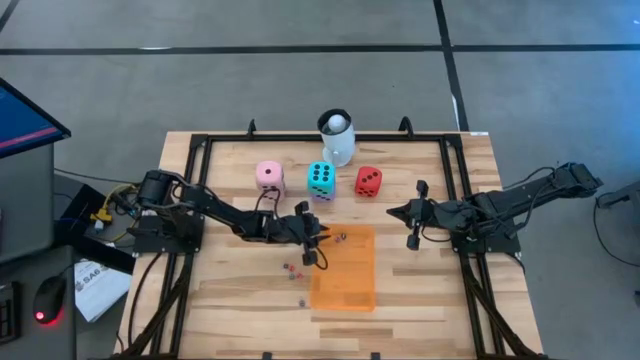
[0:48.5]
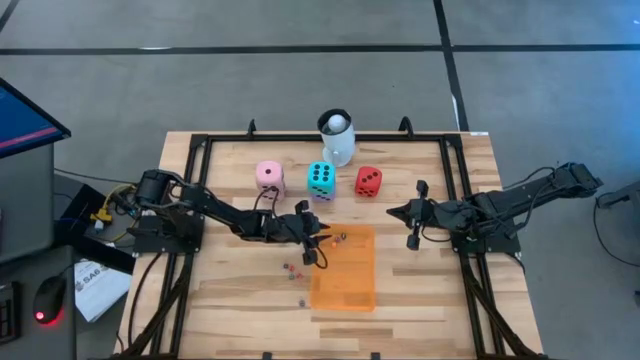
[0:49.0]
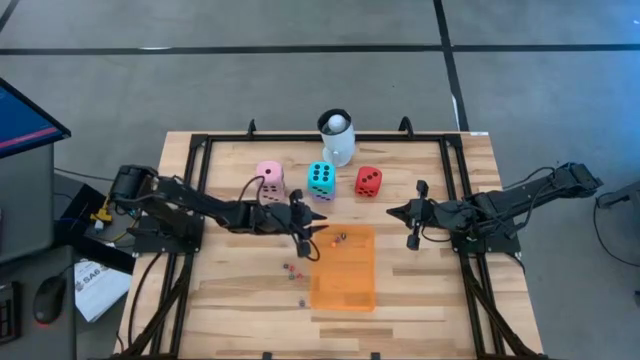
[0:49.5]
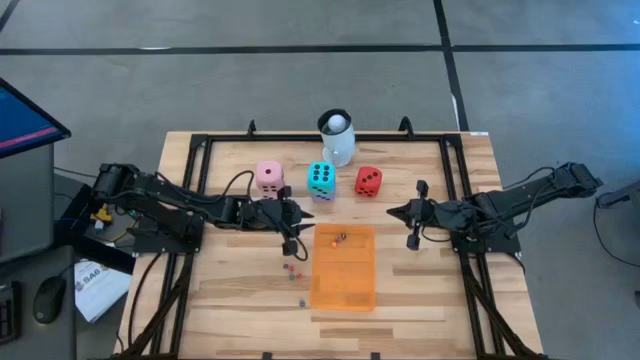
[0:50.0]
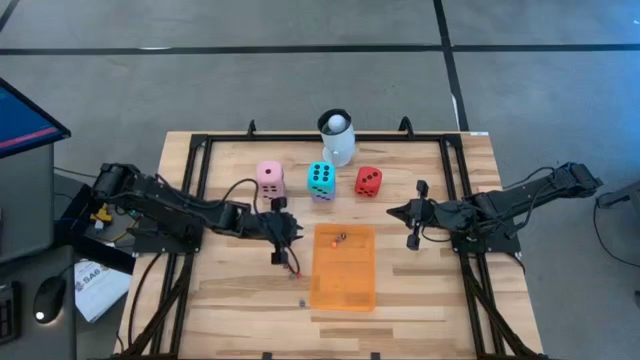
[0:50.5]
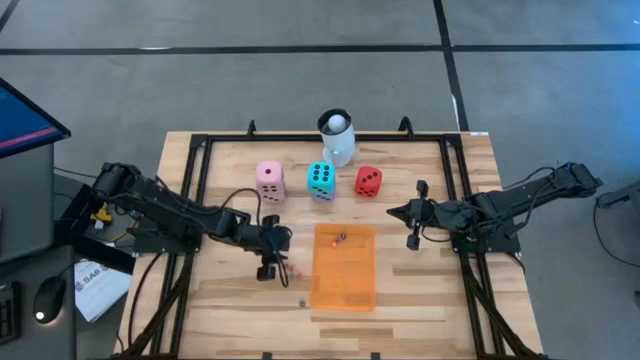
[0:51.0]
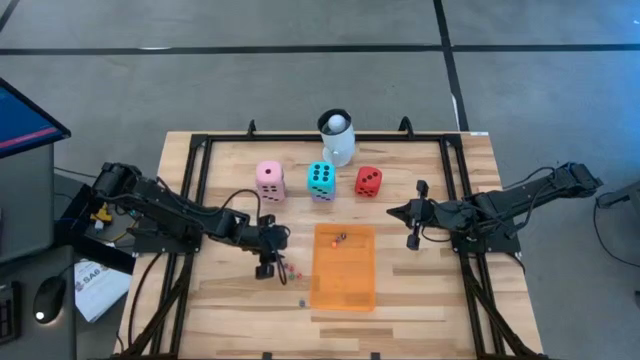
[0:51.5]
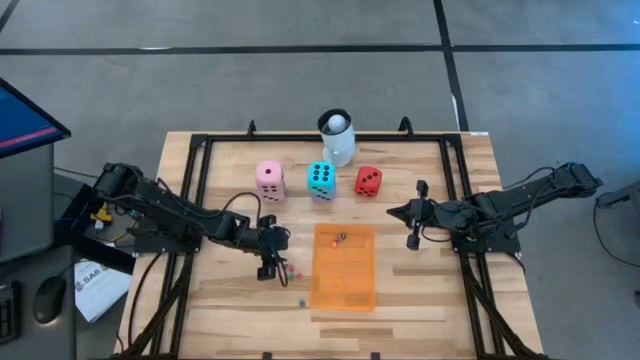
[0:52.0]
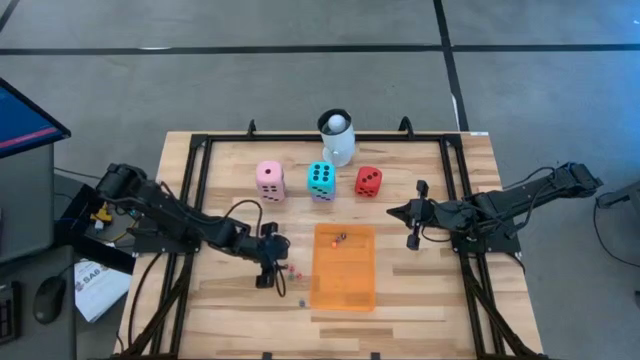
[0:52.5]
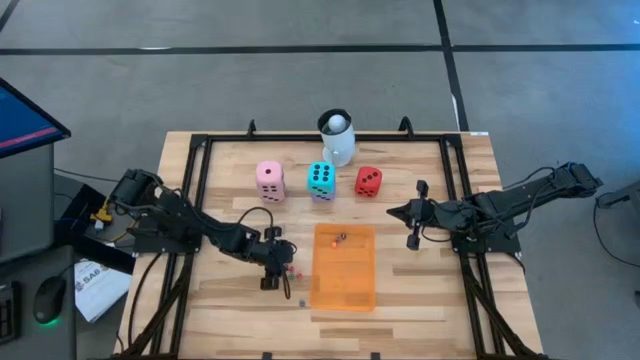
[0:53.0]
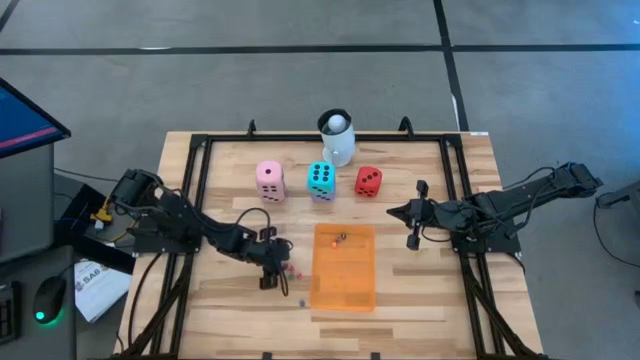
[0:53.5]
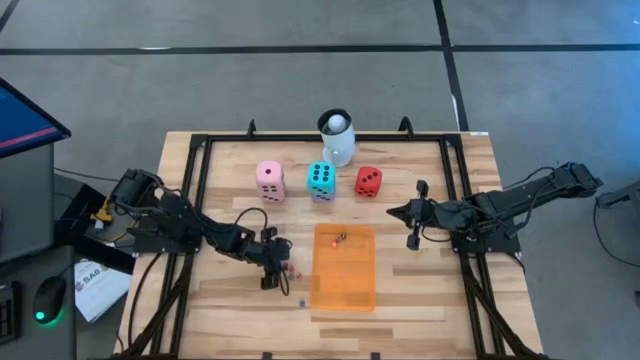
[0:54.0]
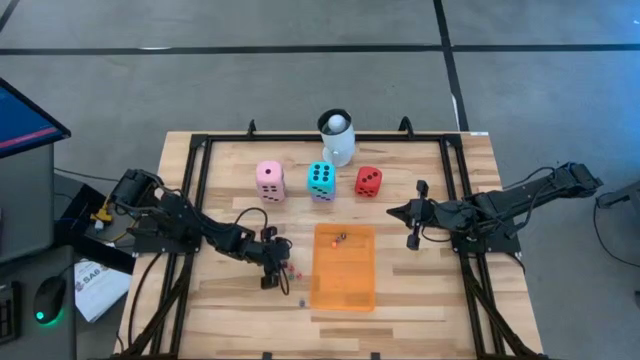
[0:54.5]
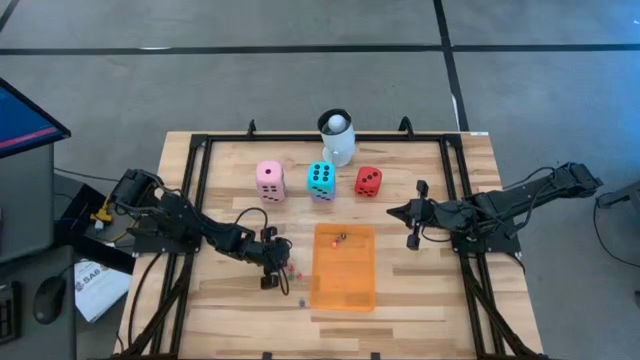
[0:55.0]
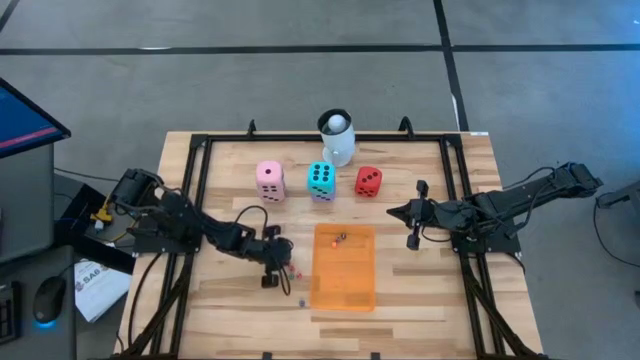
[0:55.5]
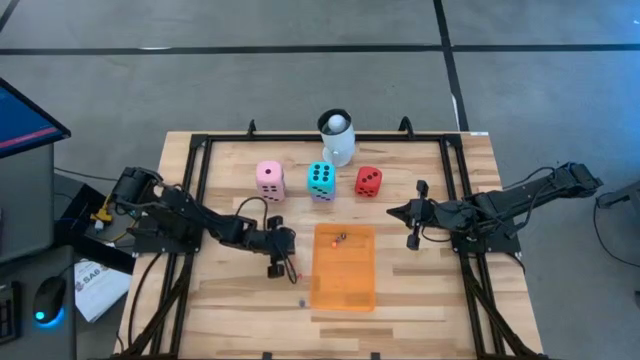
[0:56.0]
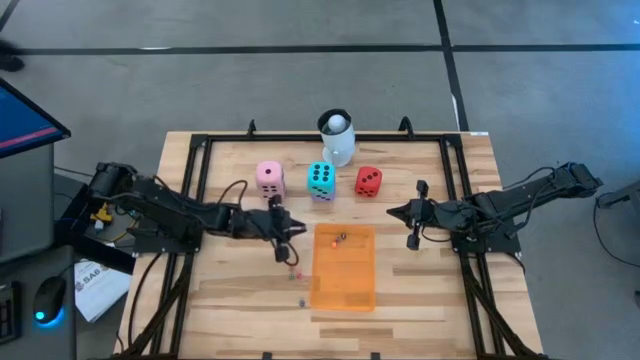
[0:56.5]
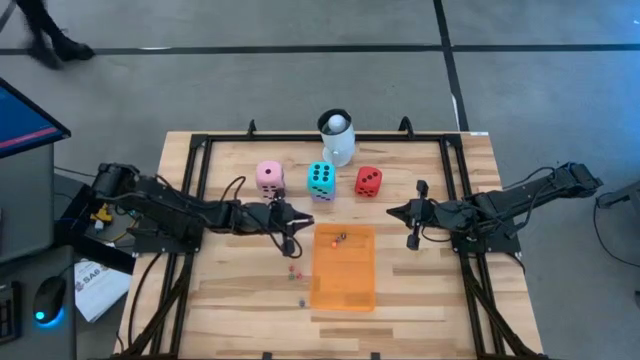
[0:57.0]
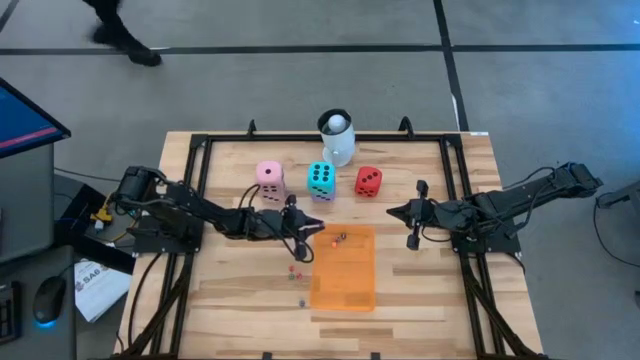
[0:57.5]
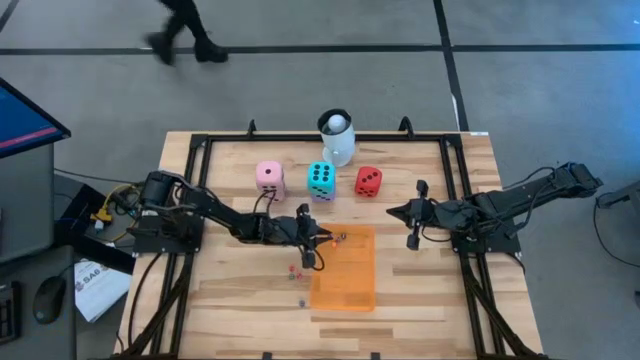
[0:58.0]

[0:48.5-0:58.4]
Task: Pick & Place Dice
Put the small purple dice into the orange bin

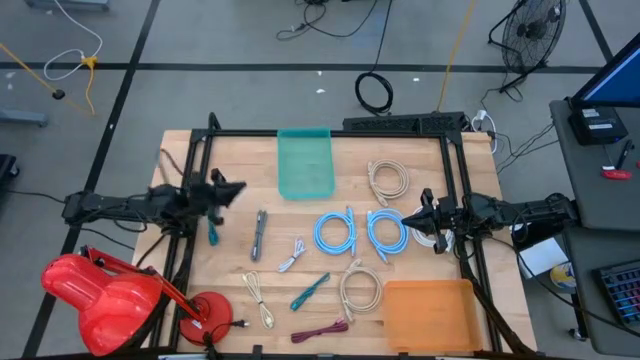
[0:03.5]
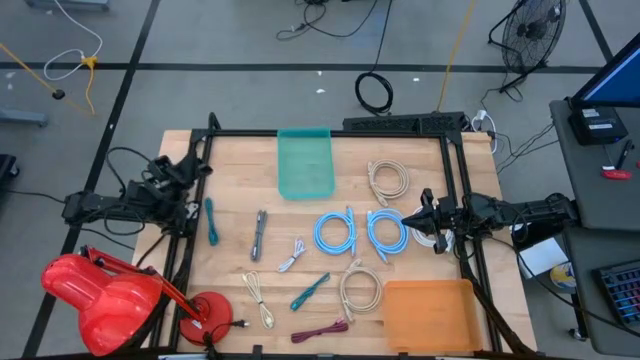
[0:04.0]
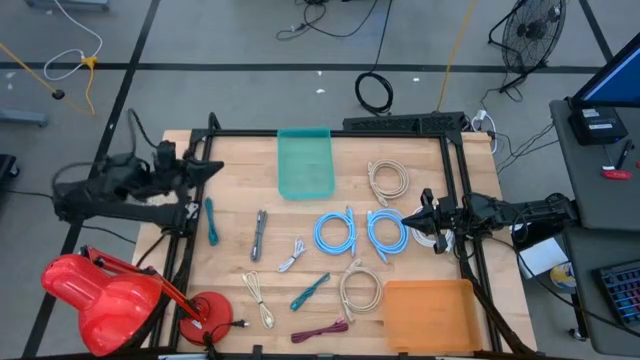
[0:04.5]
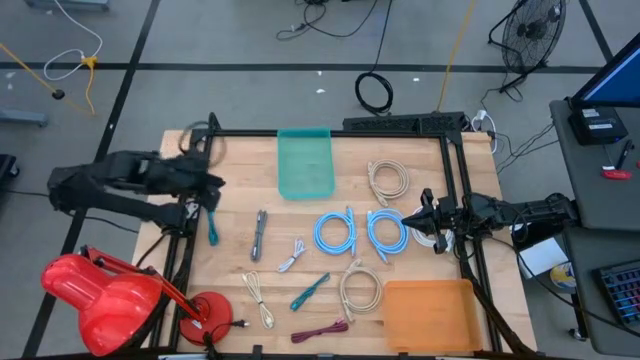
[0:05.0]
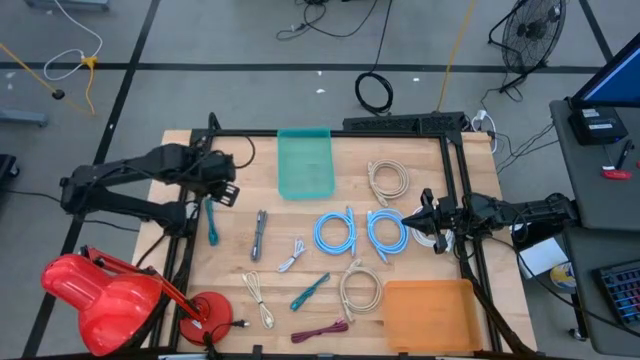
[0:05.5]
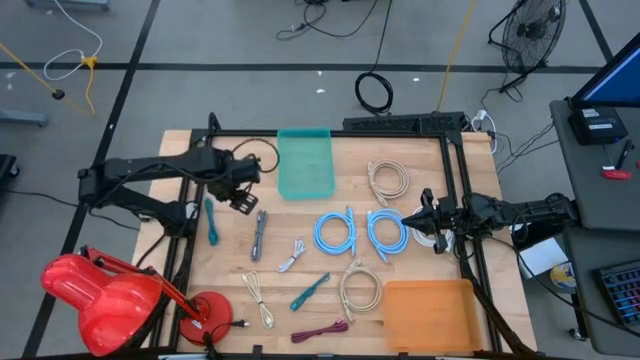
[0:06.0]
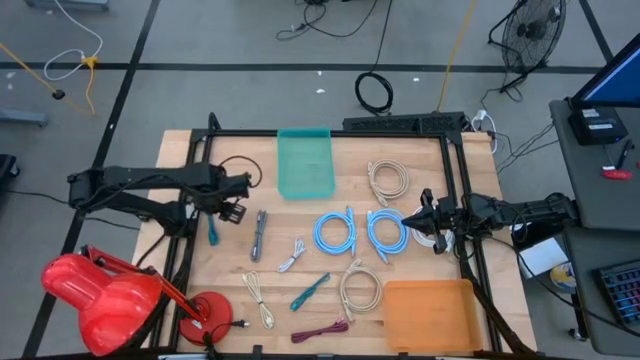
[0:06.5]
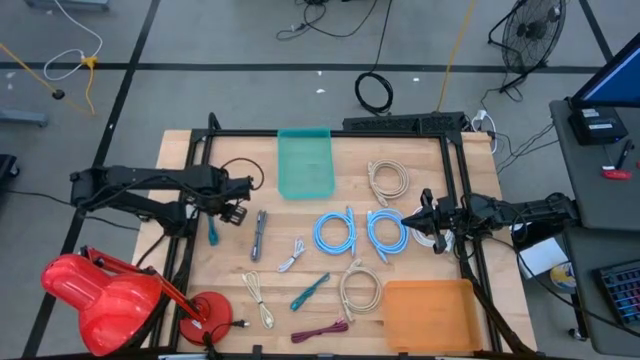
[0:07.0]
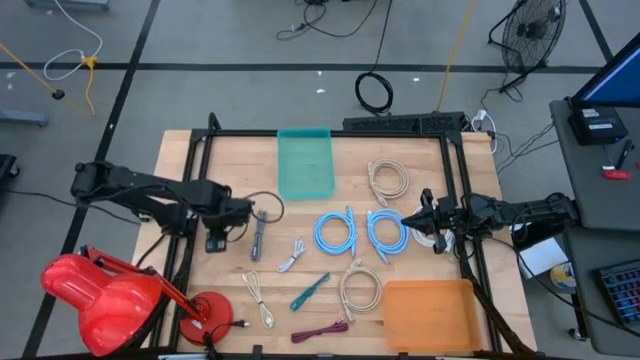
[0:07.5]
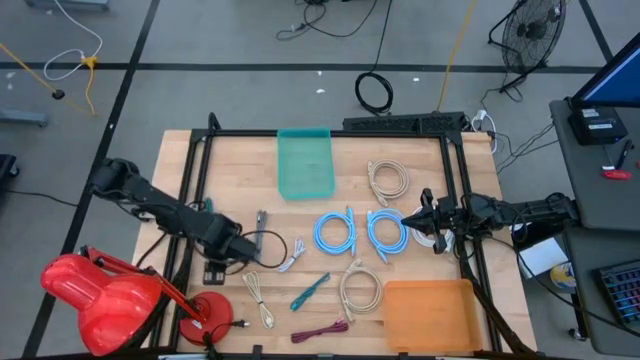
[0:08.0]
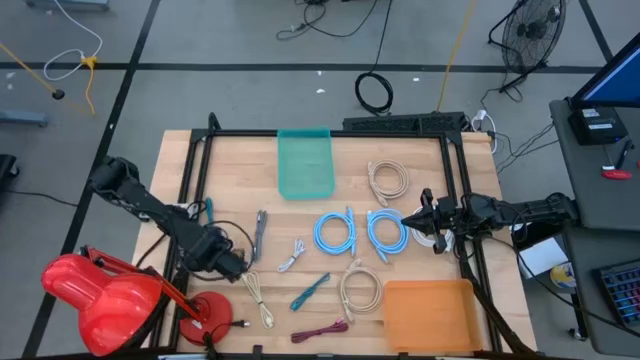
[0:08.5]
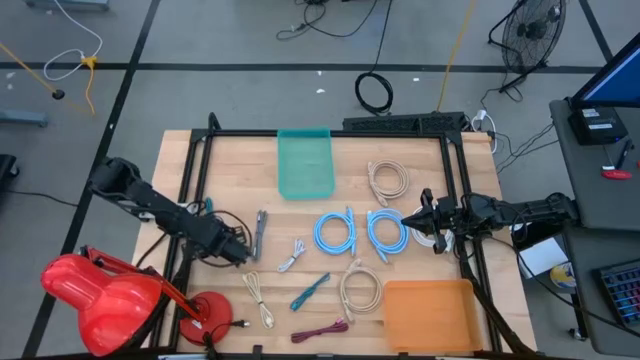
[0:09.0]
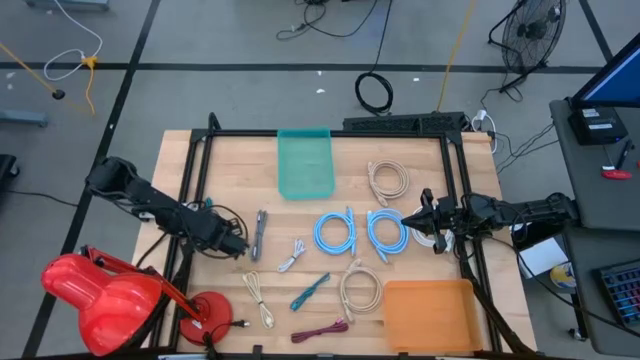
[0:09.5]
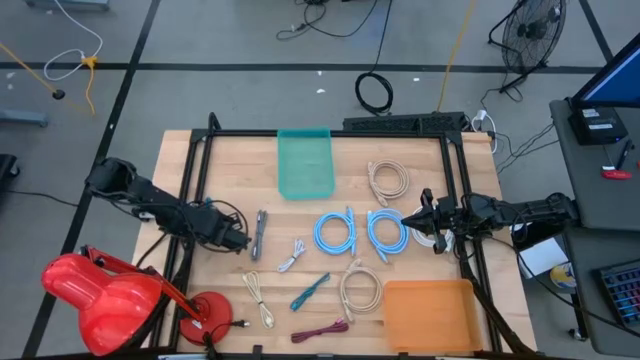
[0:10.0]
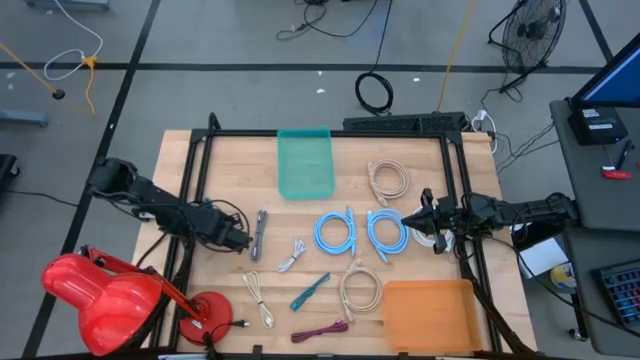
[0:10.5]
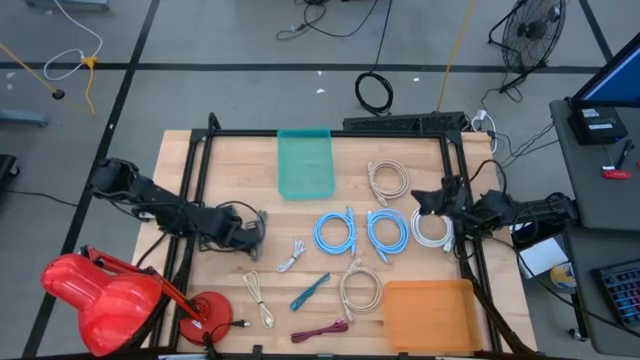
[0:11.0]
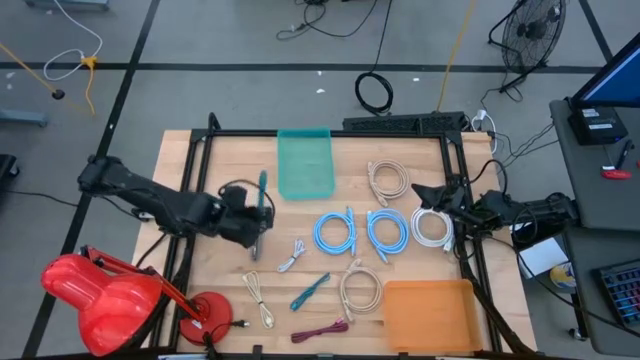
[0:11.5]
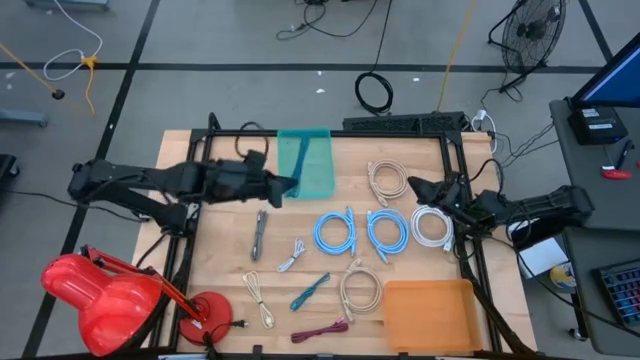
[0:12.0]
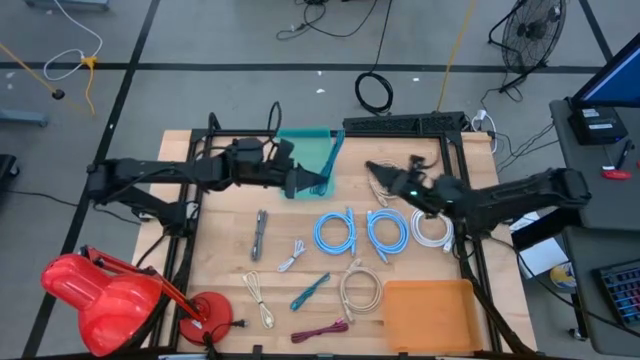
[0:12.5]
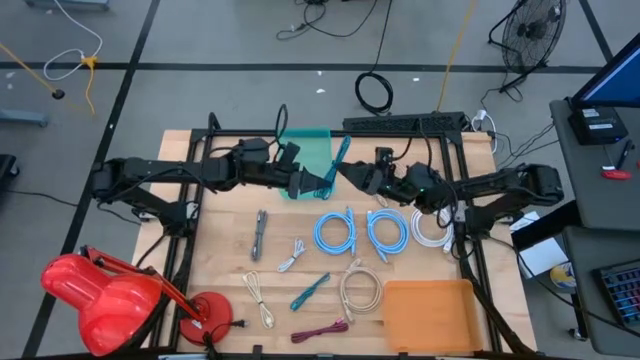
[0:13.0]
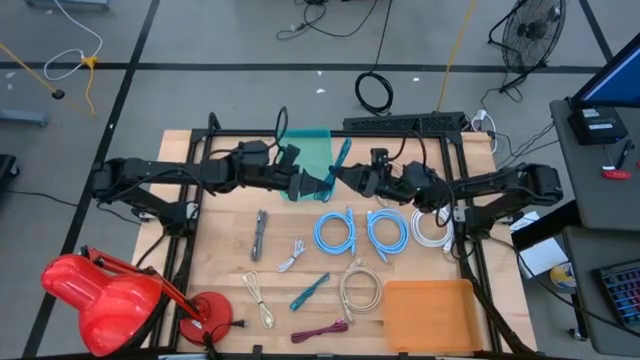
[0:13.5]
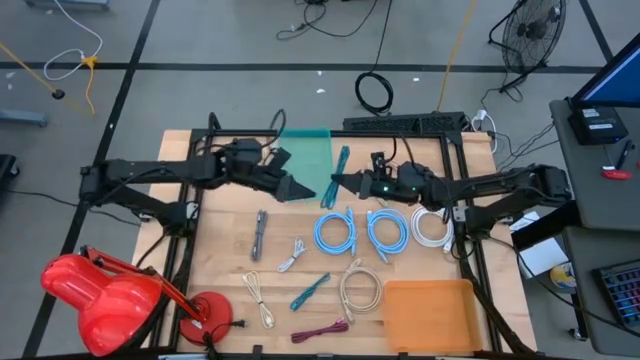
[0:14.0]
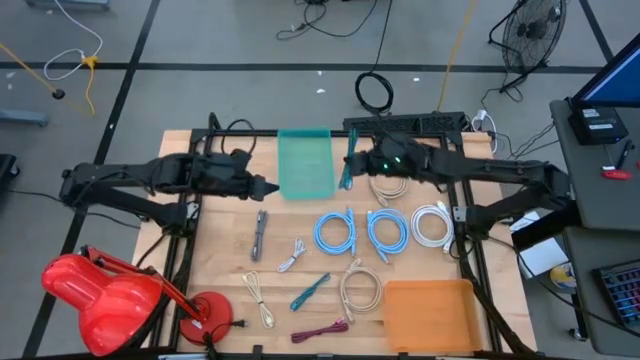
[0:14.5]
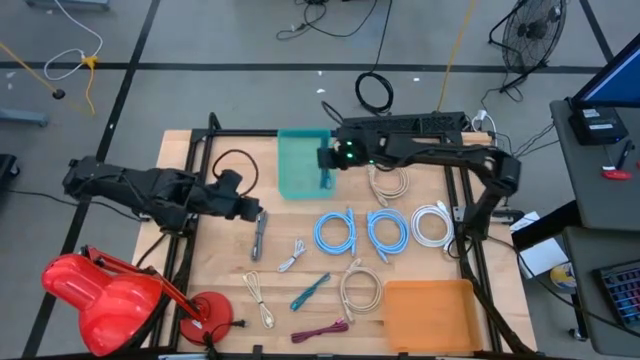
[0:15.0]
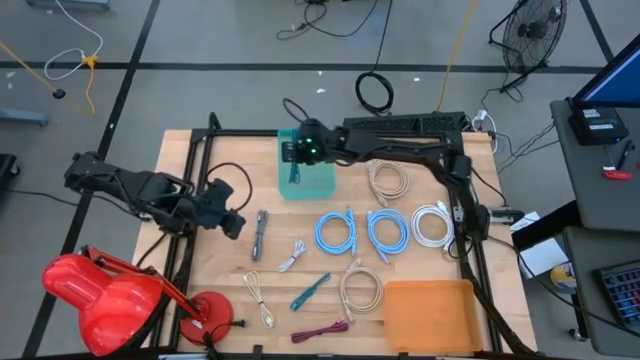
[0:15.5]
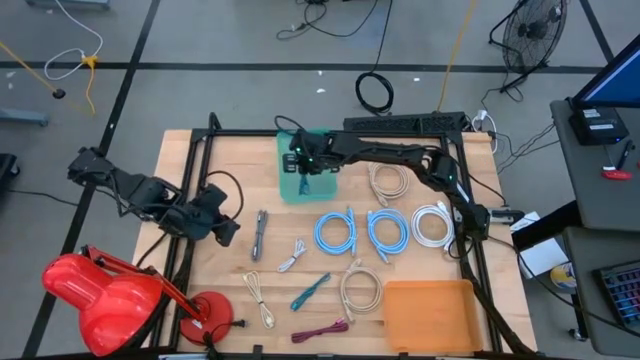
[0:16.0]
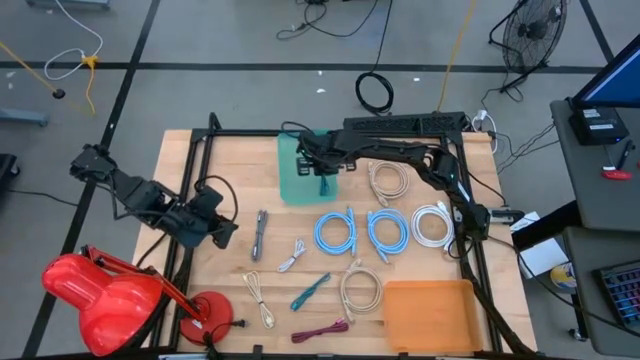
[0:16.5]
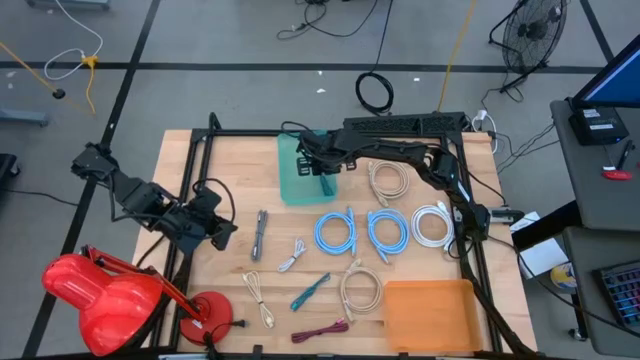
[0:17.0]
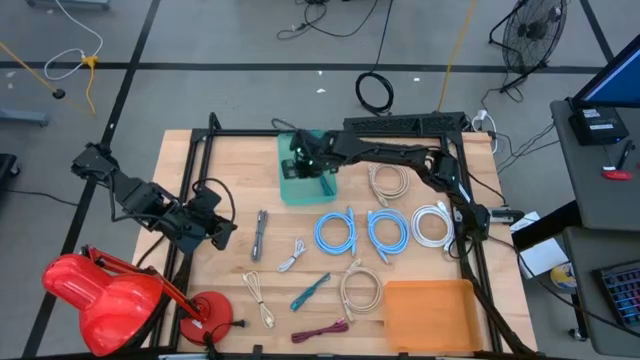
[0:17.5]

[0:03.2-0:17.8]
Task: Pick & Place USB Port
Put the top blue charger cable into the blue bin
